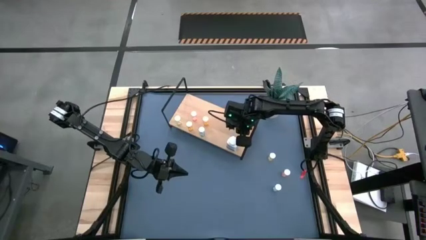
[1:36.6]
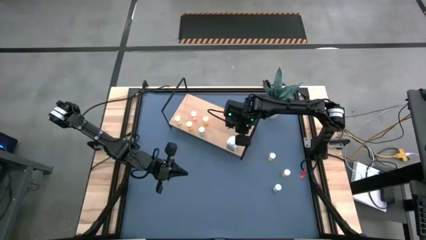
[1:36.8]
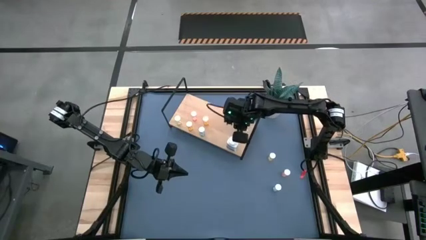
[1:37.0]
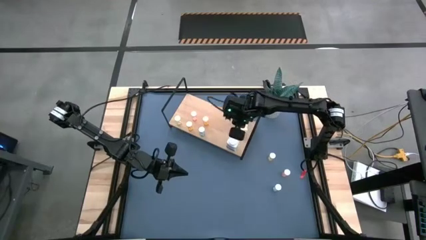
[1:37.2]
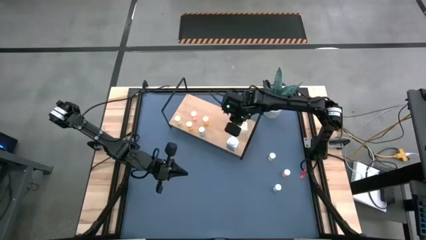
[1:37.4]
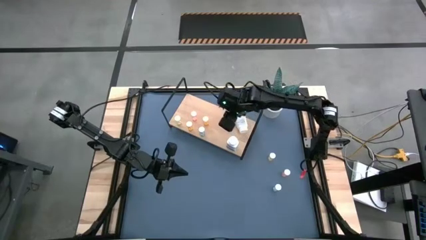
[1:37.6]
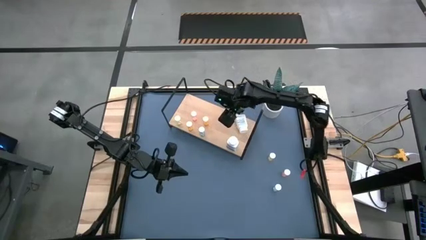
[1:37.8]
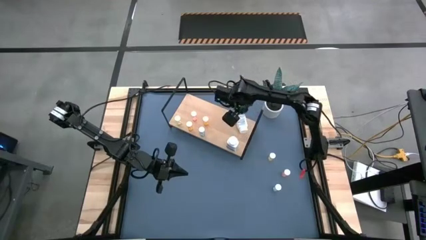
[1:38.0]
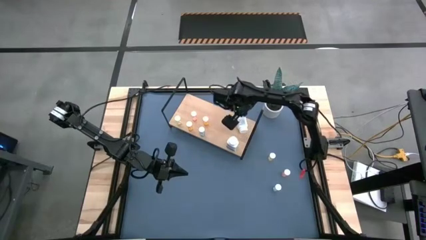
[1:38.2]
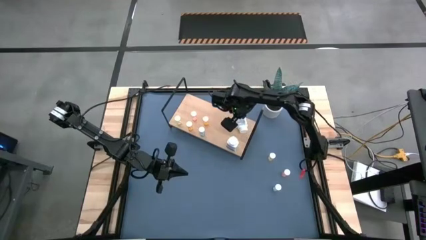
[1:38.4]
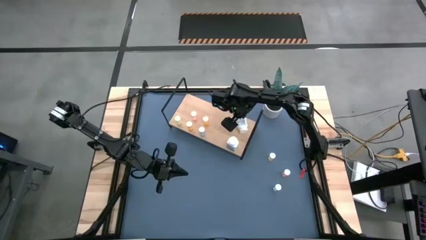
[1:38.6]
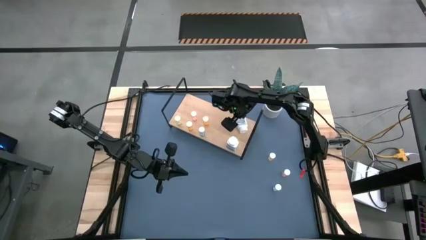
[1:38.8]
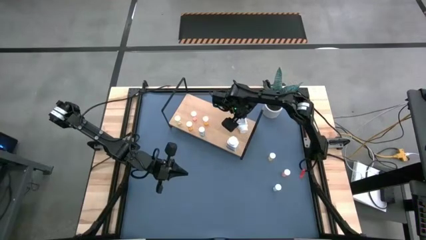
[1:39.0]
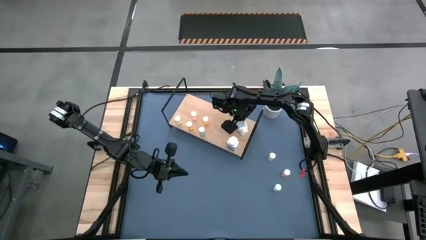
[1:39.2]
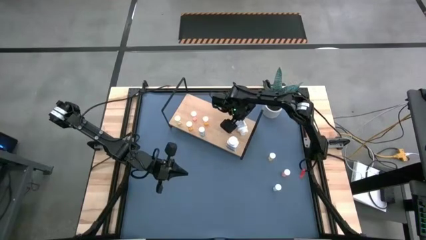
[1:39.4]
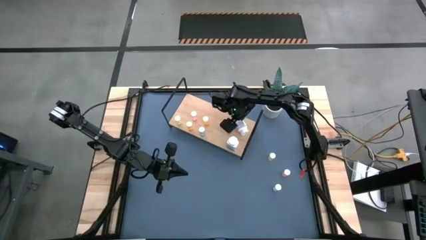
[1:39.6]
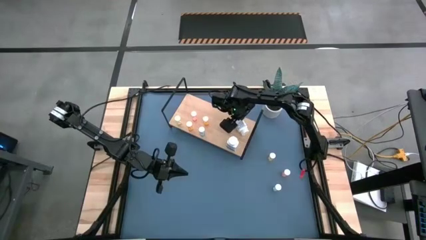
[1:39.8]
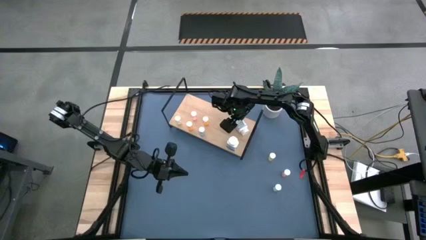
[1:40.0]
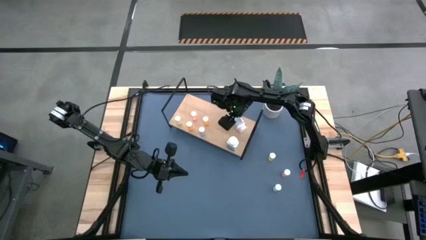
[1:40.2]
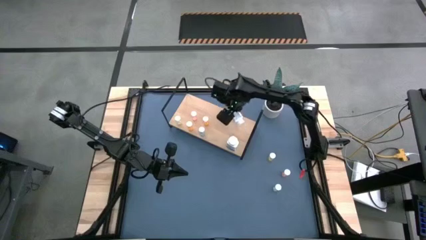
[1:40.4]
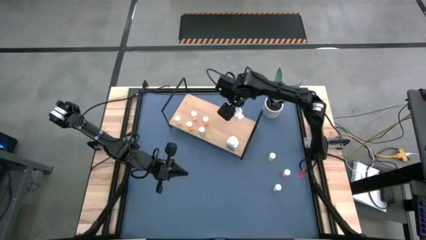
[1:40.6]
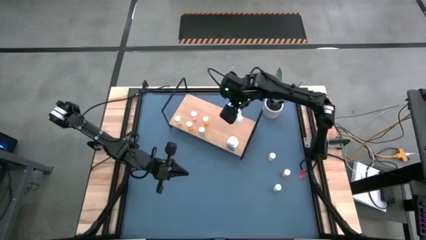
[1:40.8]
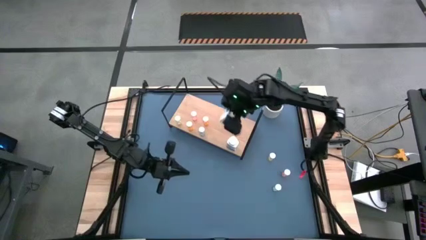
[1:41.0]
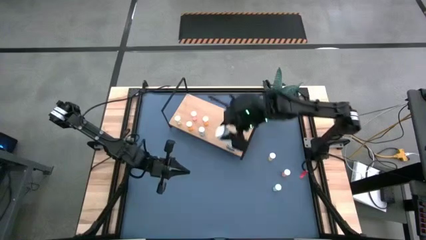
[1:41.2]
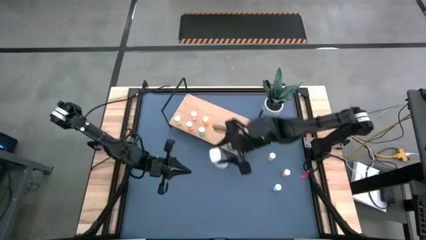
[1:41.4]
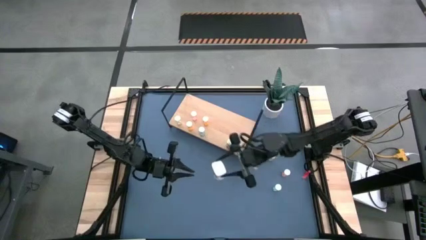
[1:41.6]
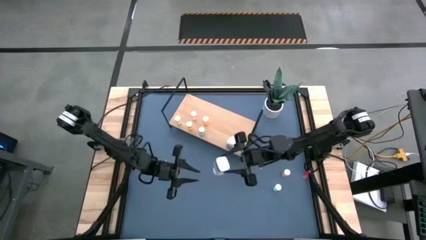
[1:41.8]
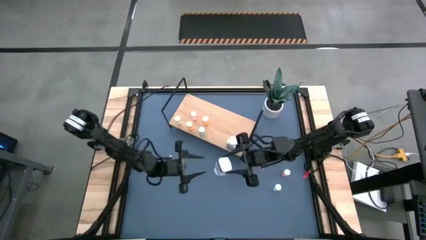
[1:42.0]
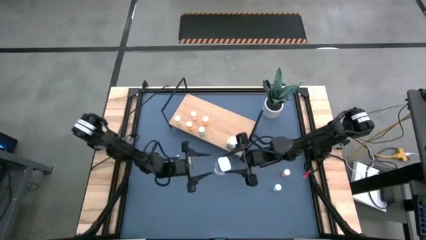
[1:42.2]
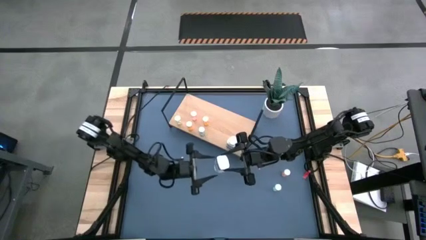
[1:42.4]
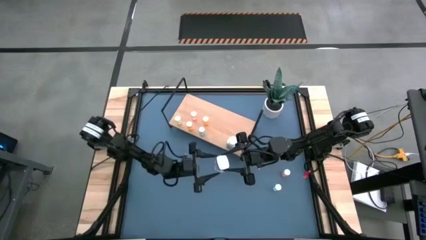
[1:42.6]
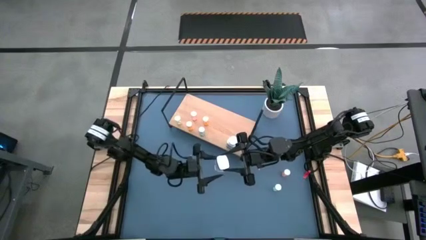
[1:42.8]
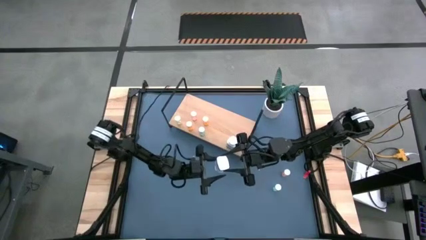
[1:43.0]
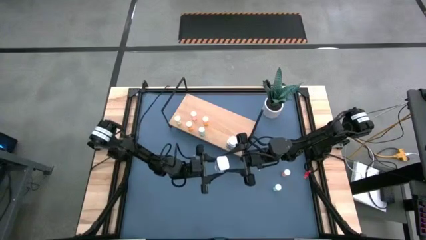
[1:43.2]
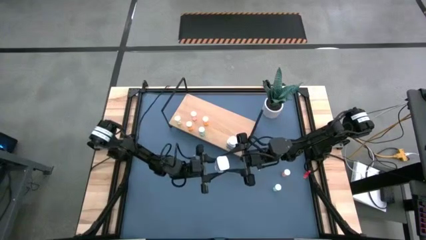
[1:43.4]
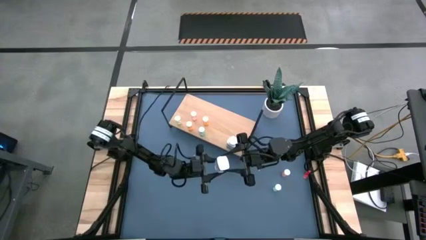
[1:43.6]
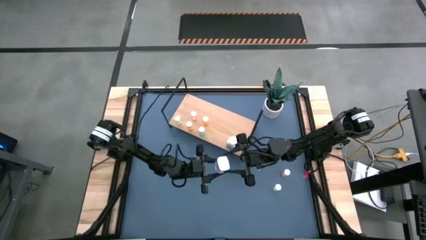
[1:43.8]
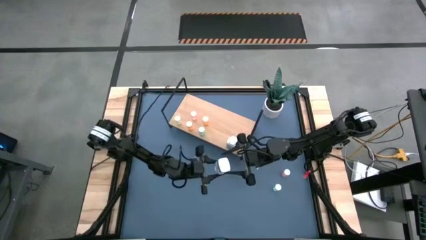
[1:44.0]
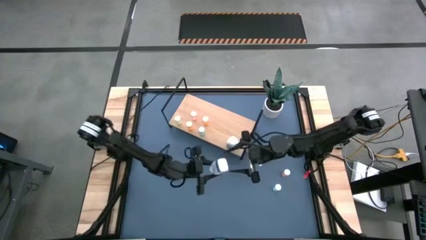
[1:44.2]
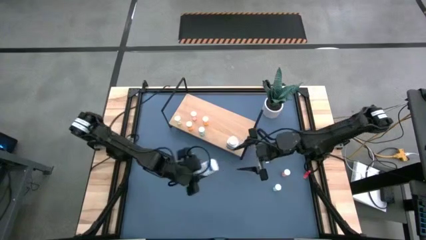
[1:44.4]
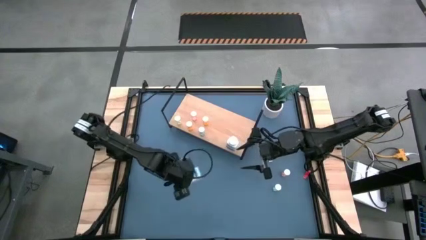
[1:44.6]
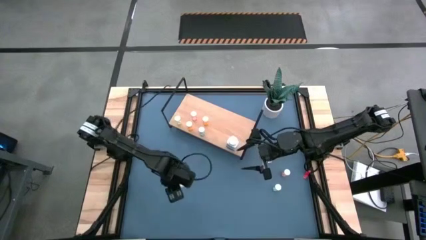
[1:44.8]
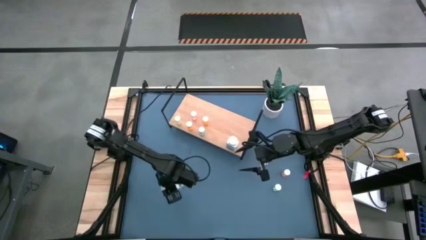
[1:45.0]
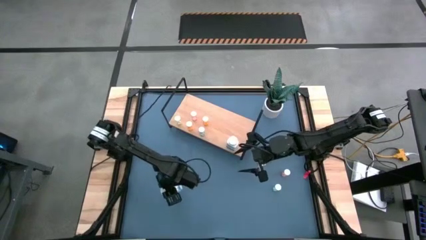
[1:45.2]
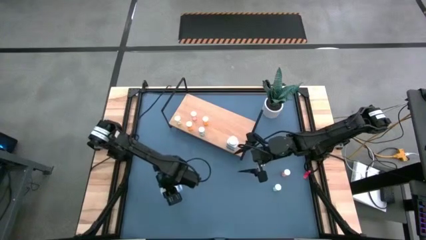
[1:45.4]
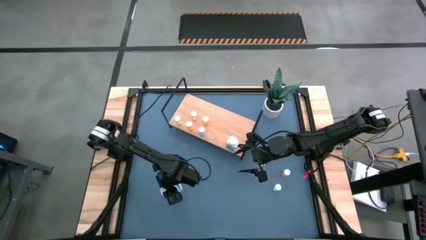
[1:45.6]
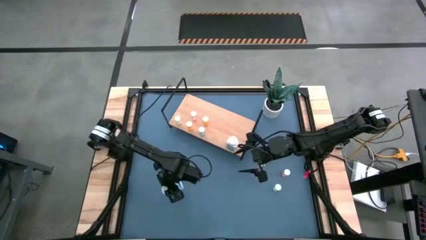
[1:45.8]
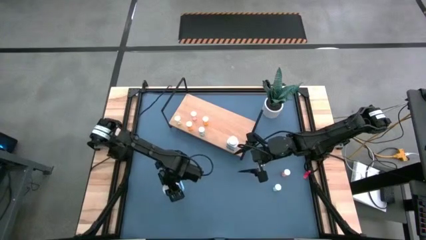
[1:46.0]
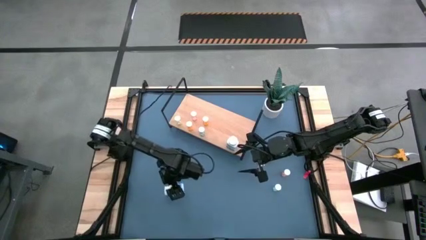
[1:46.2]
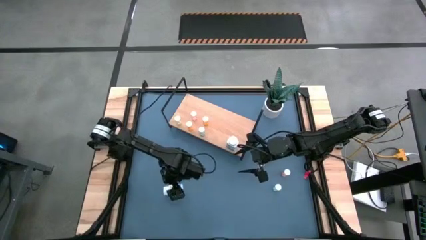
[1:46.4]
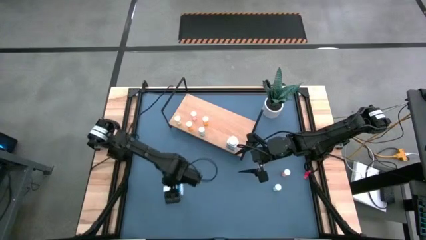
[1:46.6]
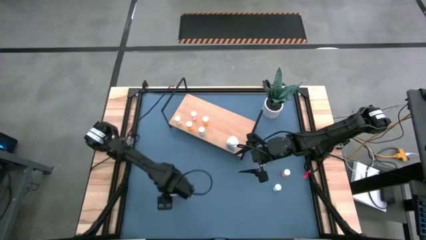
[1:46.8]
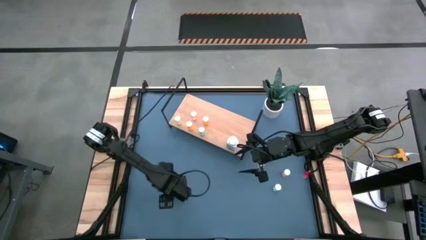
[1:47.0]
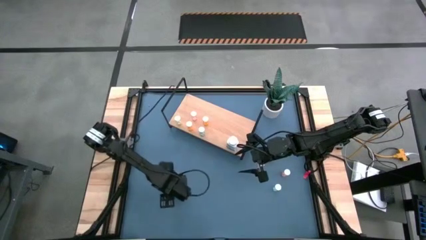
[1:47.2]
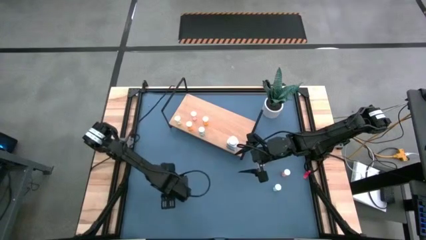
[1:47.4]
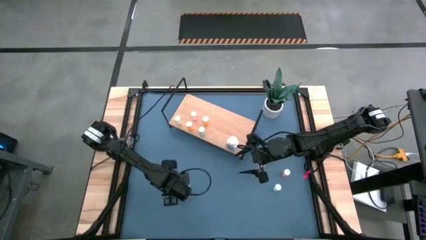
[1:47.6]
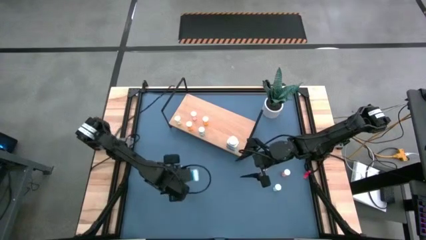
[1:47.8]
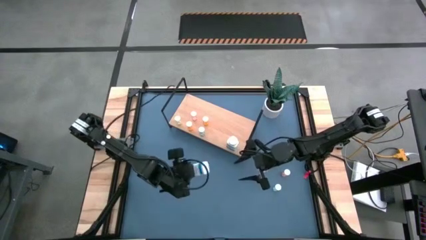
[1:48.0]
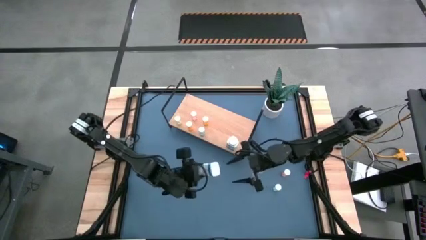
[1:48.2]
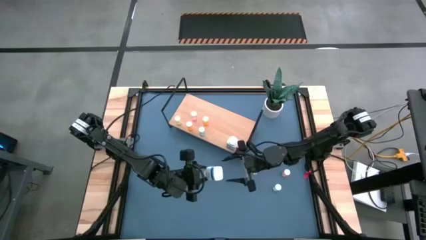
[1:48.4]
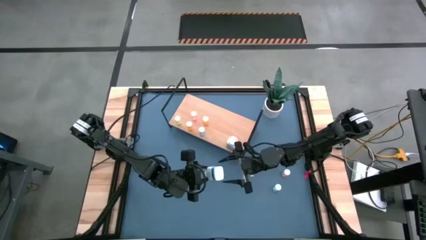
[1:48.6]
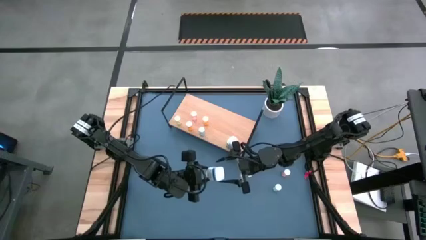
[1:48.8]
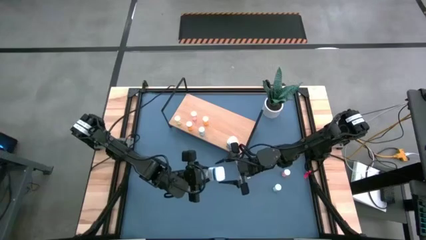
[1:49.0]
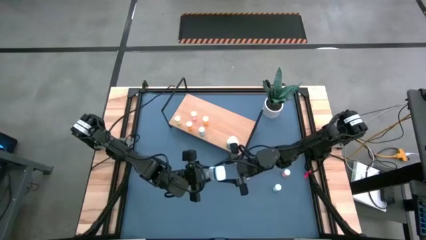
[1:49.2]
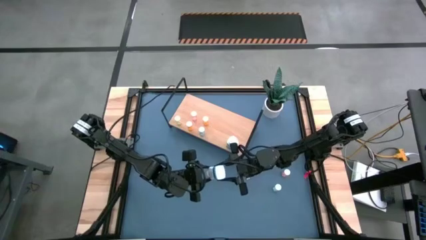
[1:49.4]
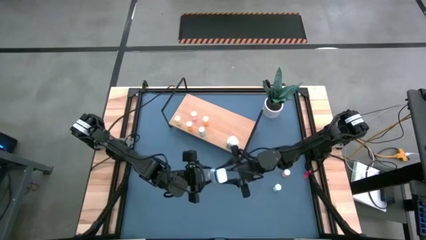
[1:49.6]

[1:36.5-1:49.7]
Task: Pick and place medicine bottles onto shelf by color
Put the white pill bottle on the shelf

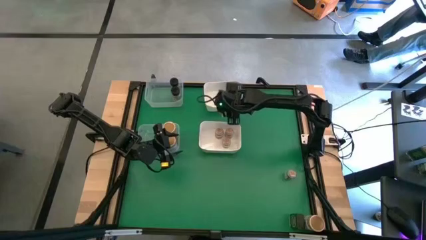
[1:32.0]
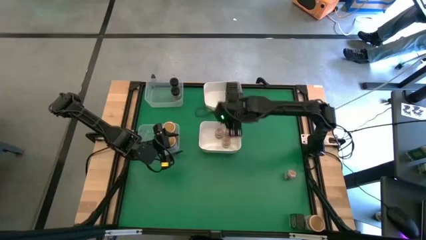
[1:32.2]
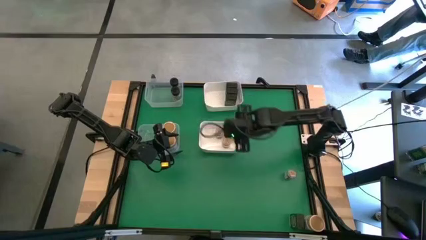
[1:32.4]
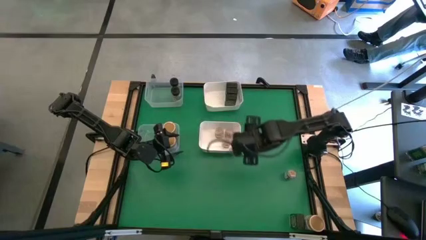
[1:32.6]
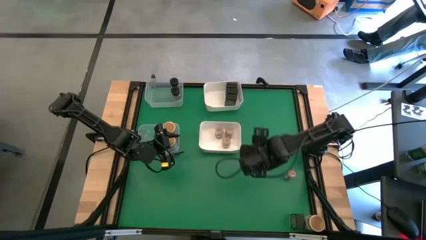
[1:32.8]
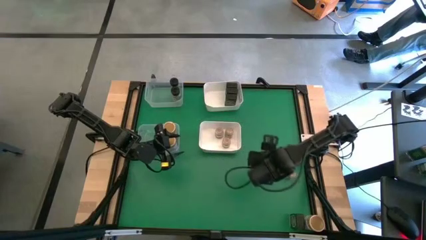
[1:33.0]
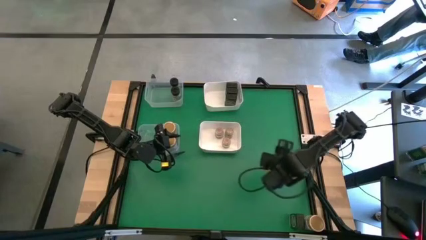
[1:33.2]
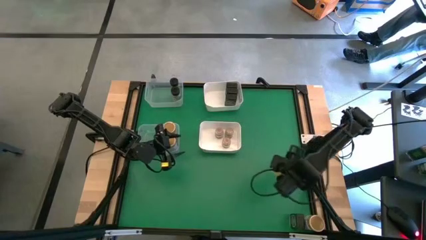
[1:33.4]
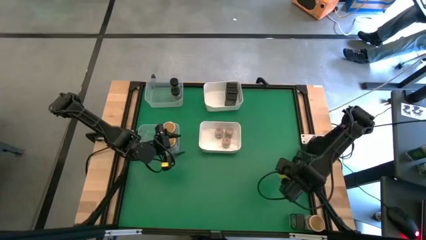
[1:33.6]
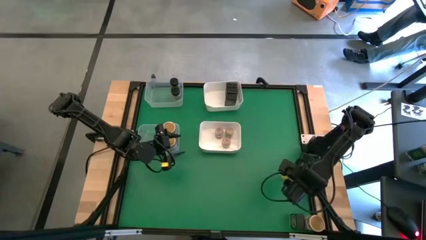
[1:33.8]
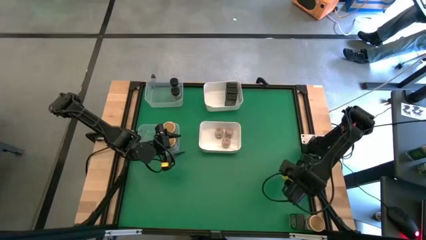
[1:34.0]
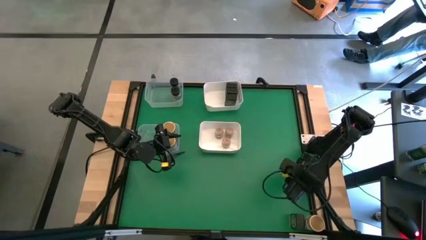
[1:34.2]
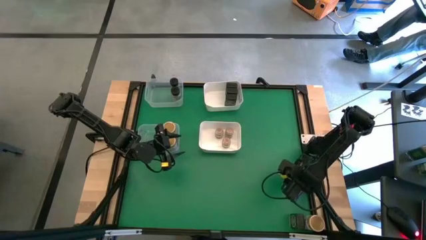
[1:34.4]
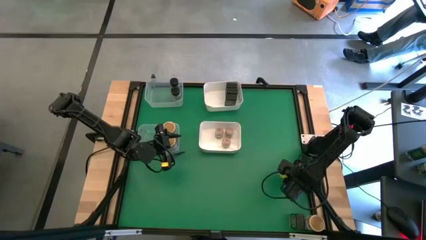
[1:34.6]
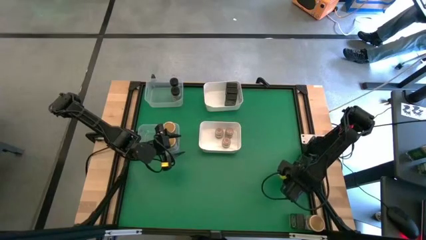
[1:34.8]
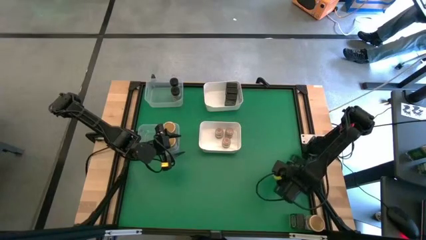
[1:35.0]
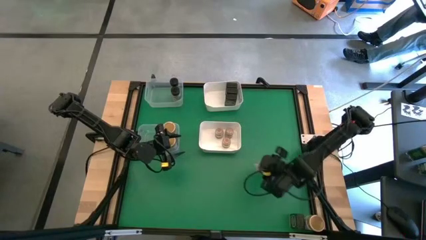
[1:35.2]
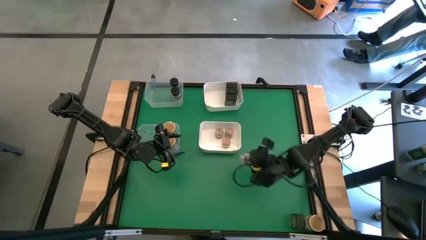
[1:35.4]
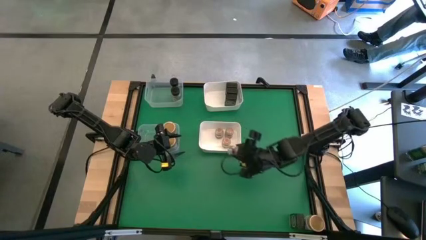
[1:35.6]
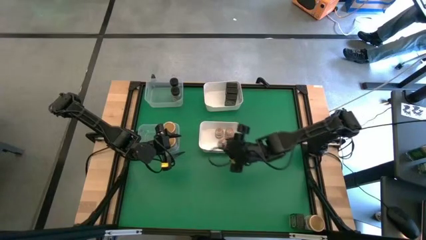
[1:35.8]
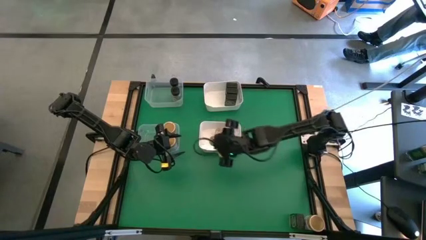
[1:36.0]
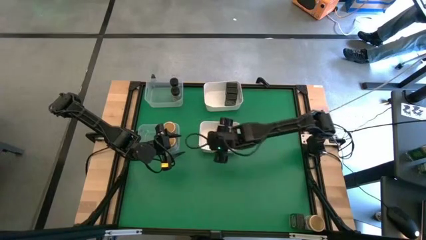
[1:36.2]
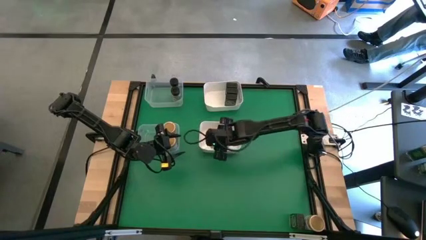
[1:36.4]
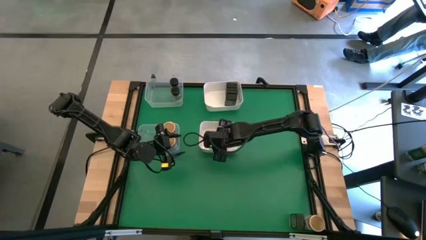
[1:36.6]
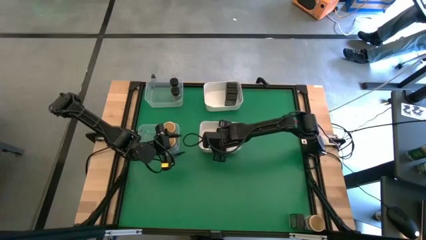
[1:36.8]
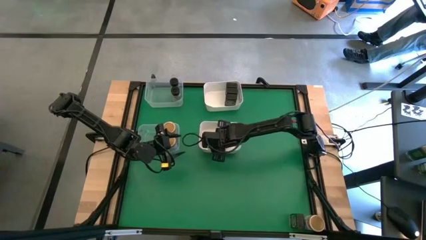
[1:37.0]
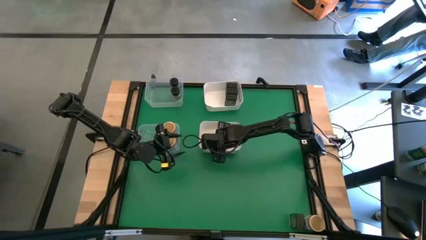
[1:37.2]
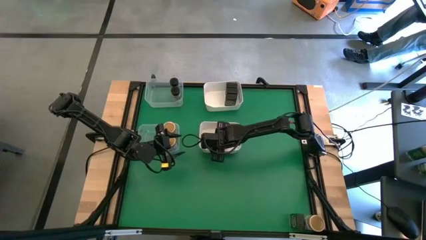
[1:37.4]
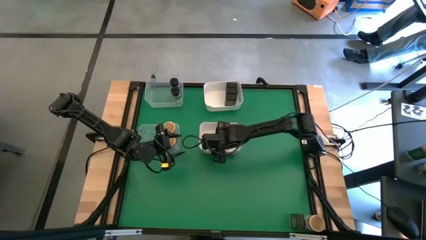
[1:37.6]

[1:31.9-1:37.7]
Task: Sort spices by type
Put the brown seasoning bottle into the bottom white bin
